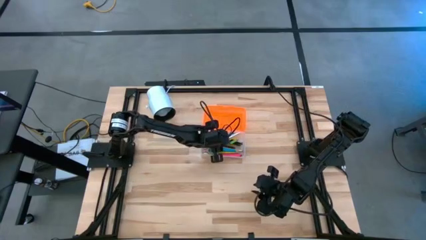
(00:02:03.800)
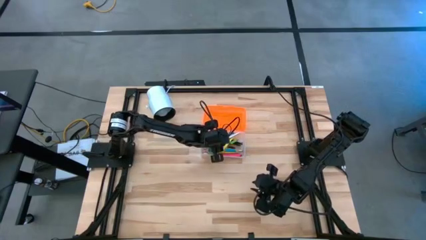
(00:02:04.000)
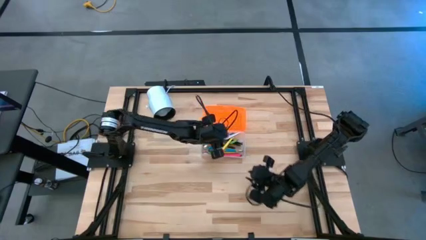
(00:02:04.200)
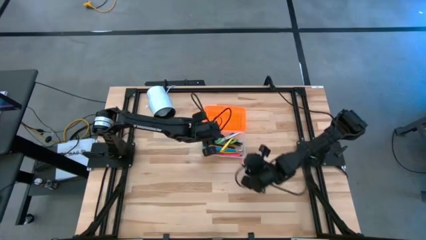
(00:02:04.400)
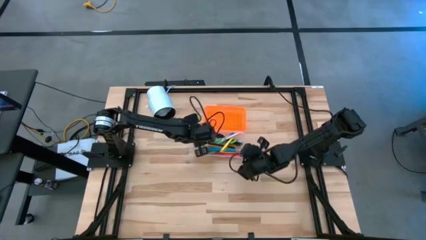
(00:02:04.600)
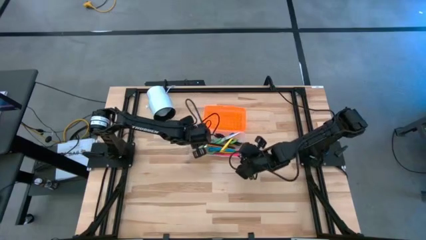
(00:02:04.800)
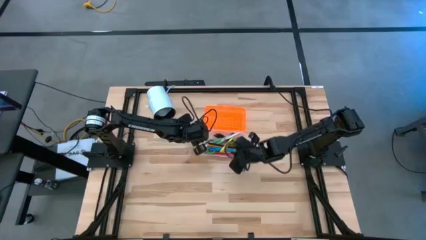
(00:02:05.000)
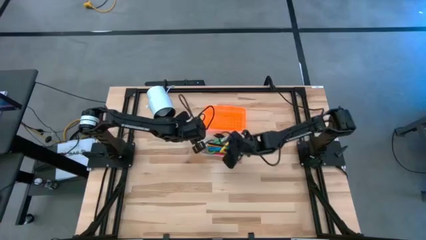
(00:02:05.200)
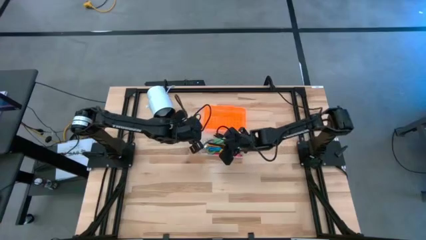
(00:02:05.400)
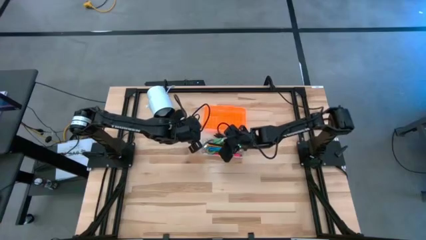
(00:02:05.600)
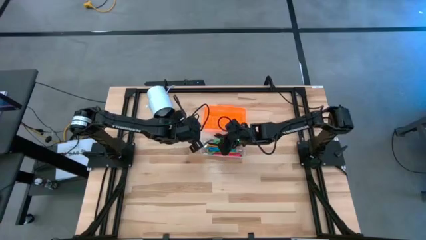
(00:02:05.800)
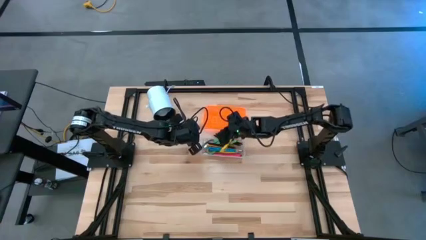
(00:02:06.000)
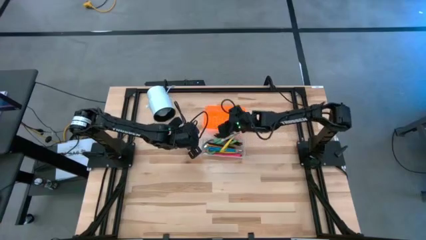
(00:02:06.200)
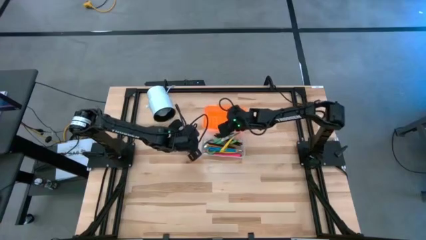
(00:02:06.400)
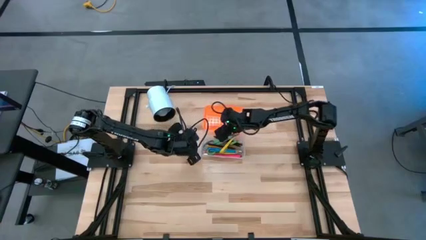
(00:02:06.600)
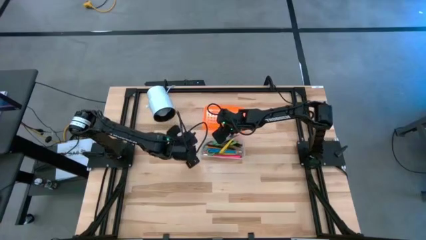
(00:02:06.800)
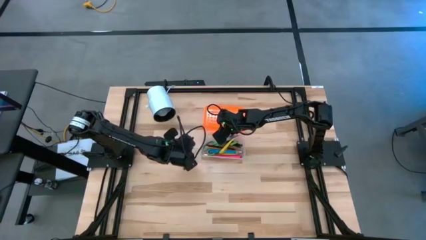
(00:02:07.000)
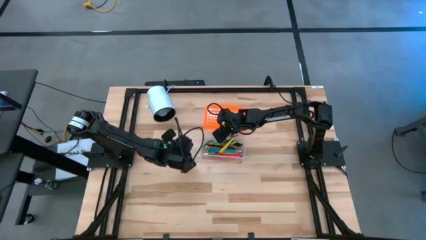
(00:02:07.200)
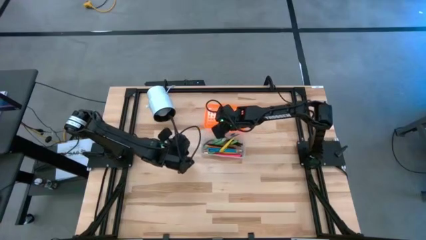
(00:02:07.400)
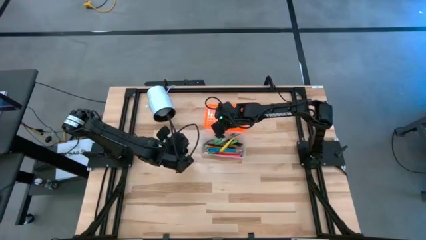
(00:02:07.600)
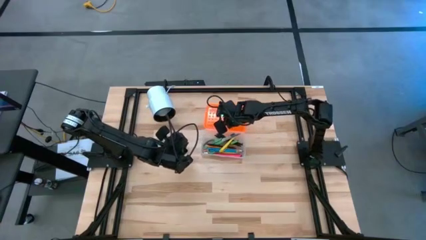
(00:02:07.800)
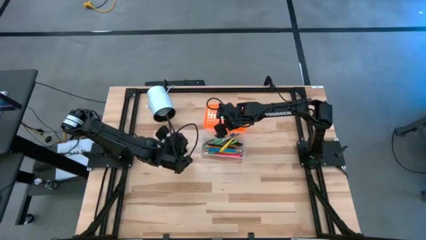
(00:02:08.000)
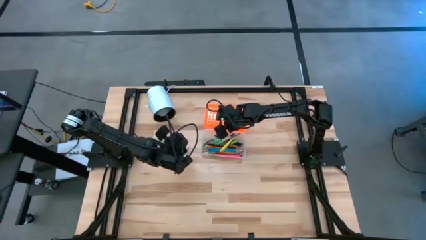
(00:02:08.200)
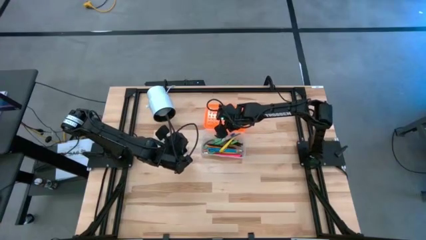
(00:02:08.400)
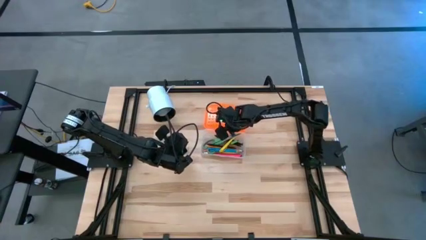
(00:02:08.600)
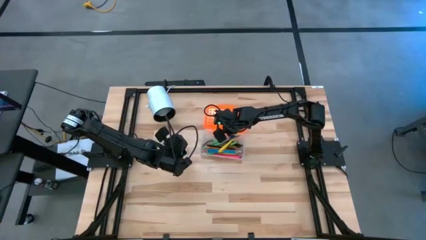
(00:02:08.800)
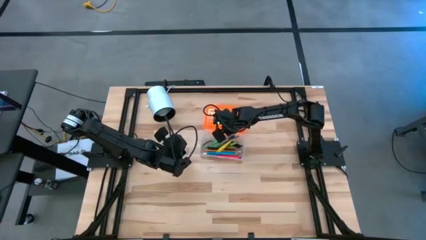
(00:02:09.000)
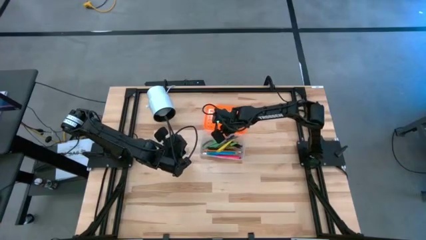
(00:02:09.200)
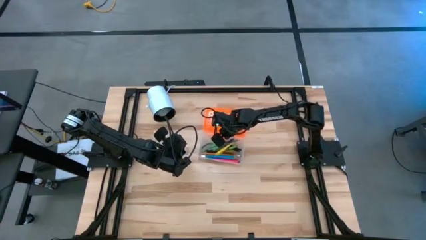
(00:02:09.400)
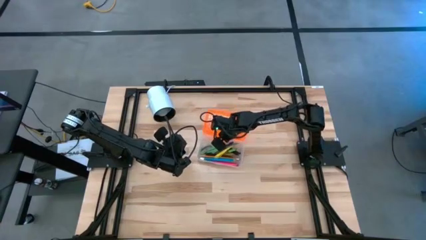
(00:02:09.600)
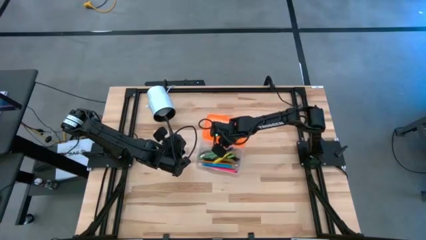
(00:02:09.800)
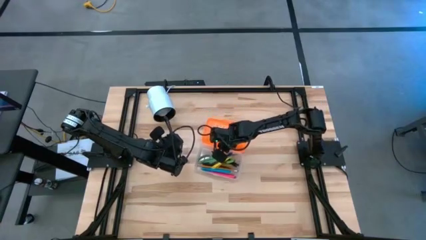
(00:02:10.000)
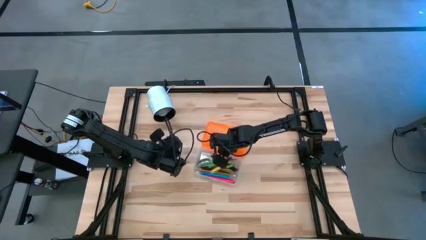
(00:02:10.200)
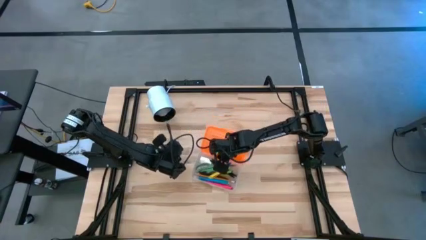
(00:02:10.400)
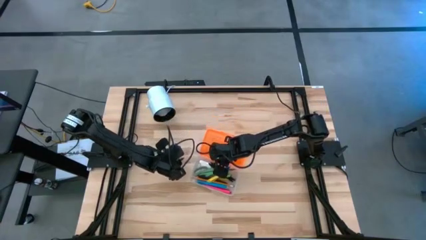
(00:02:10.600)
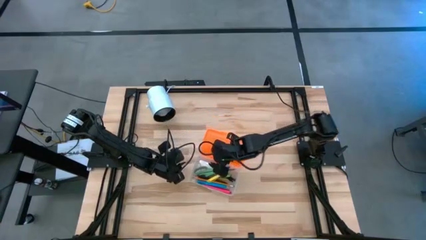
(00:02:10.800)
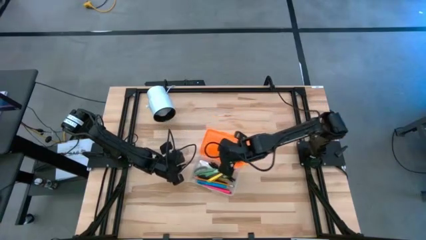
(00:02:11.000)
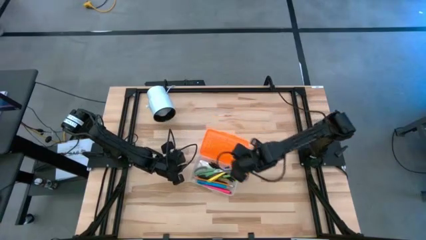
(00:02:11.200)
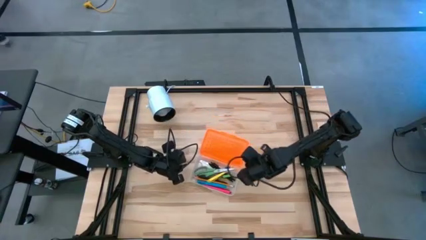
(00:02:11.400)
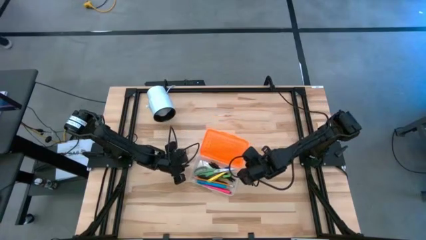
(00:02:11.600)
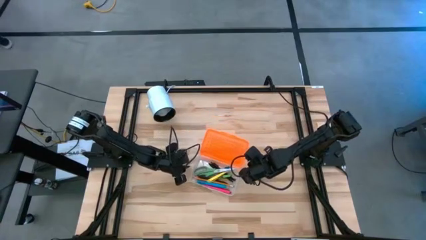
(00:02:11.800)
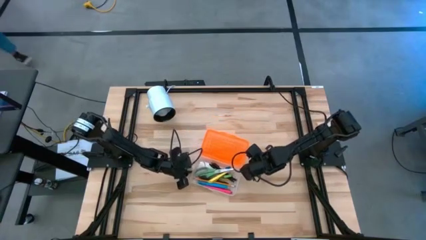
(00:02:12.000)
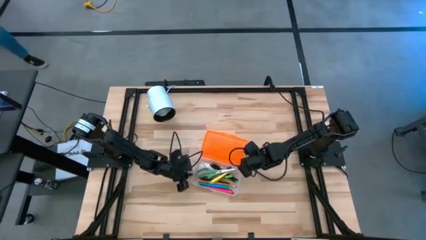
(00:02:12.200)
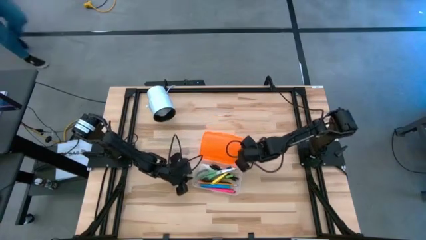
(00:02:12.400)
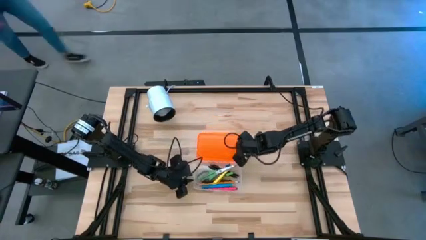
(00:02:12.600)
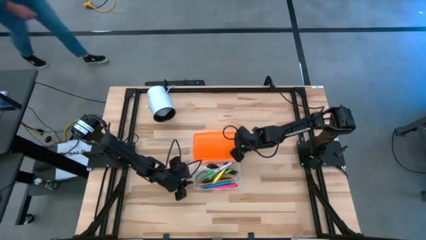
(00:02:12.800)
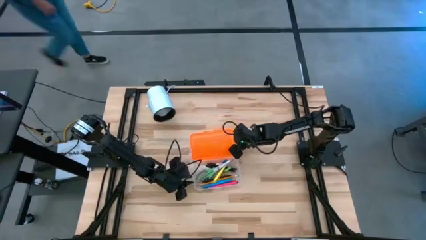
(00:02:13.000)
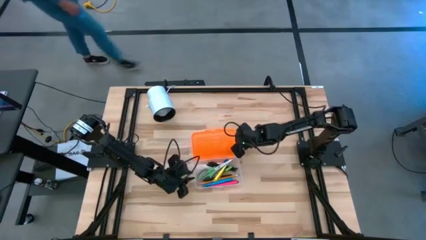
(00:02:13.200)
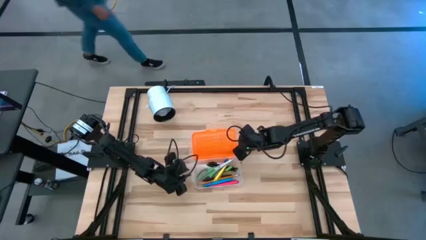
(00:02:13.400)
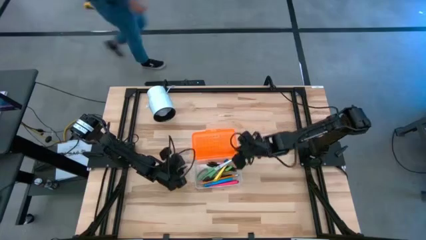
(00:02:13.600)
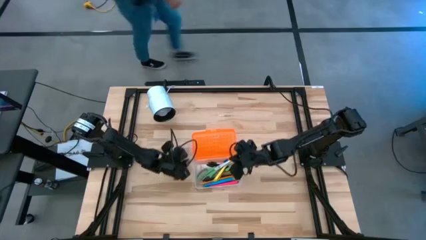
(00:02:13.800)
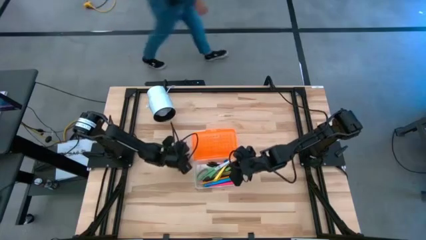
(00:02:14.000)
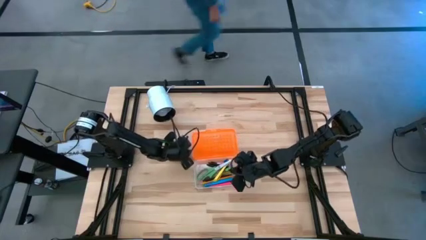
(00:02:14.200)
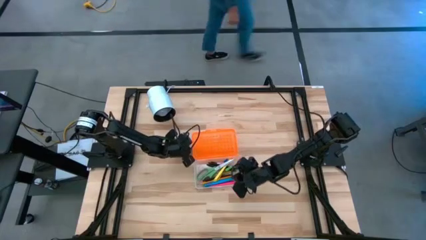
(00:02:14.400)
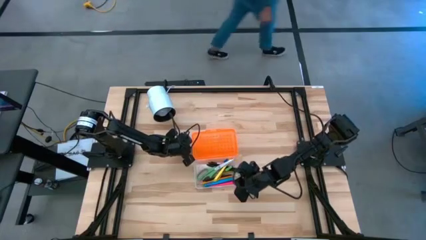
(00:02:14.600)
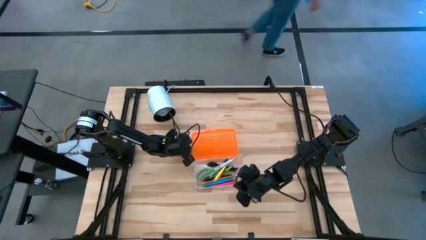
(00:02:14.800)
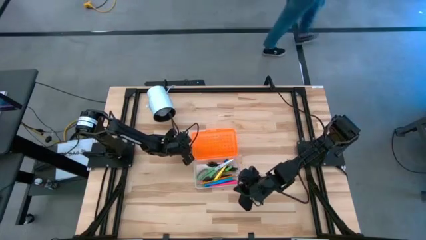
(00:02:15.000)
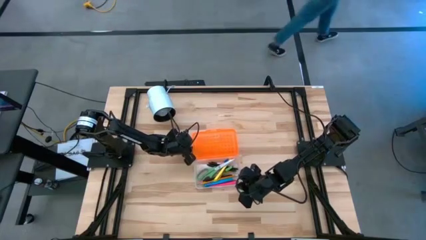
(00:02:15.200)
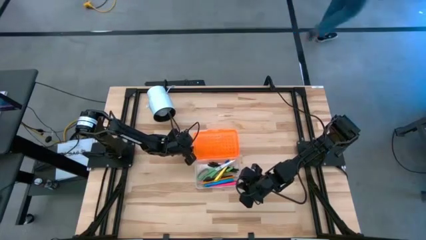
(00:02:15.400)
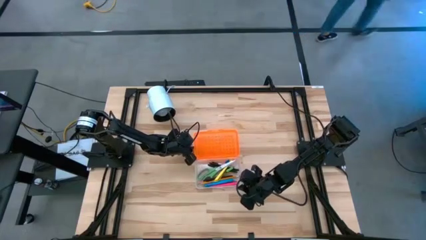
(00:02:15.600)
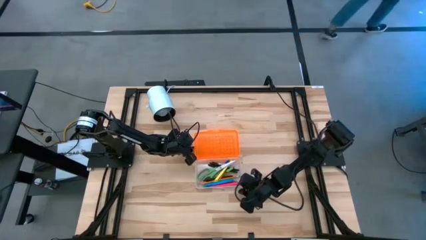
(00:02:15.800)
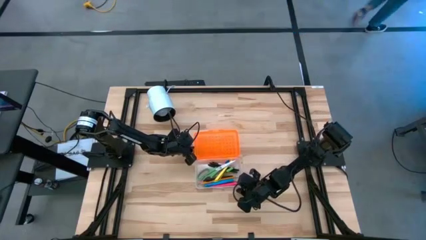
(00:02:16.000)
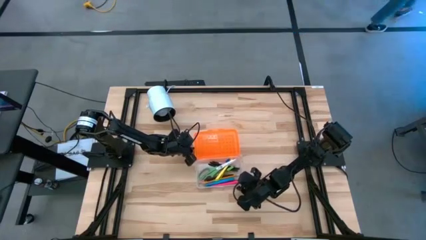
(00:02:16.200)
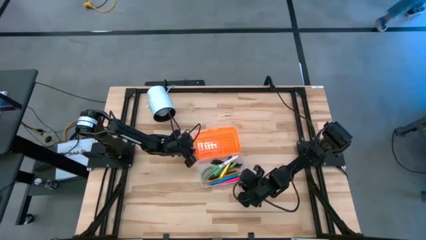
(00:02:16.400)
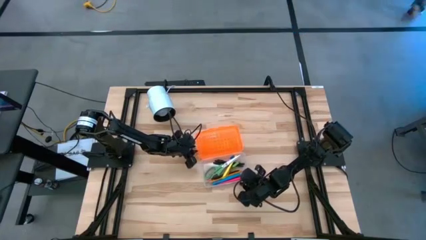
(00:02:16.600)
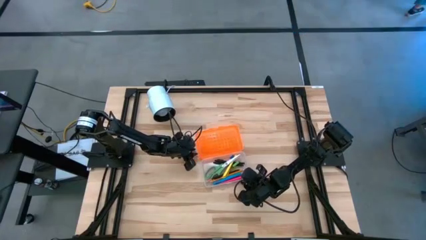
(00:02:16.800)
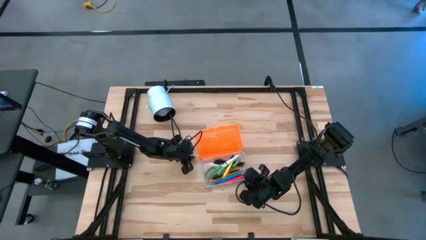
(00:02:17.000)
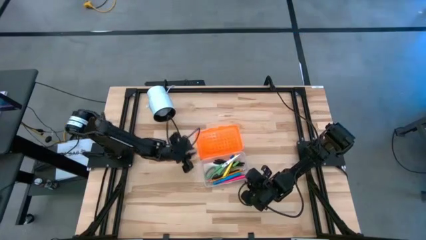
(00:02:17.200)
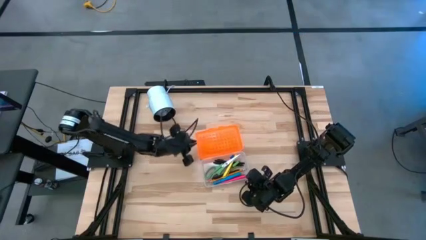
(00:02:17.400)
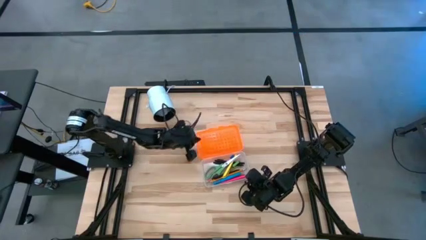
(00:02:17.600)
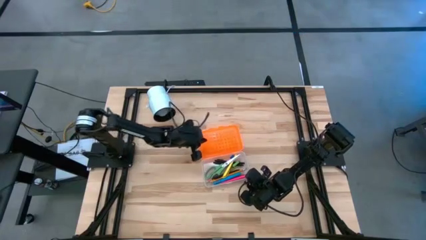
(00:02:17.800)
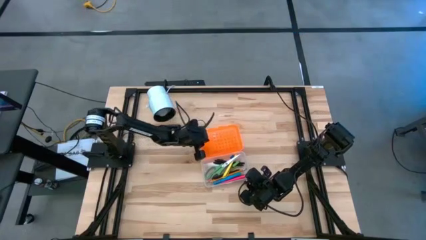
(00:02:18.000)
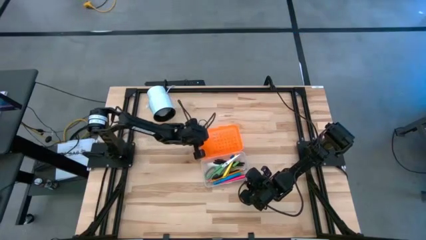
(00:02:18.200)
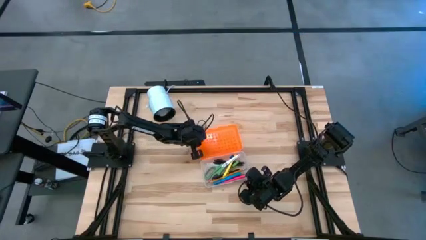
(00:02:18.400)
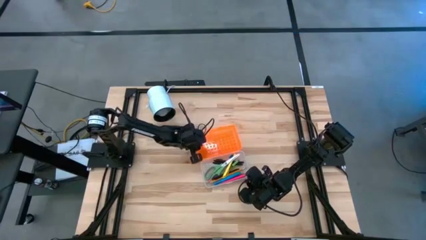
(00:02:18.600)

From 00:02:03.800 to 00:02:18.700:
Task: Pick & place school supplies into a supply box
Close the orange supply box
